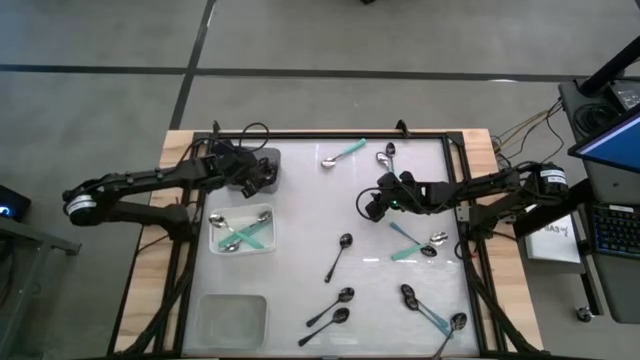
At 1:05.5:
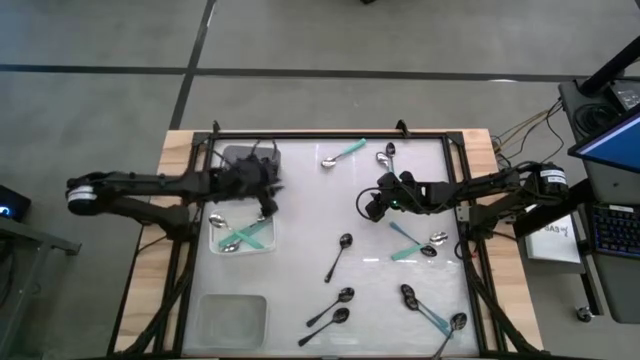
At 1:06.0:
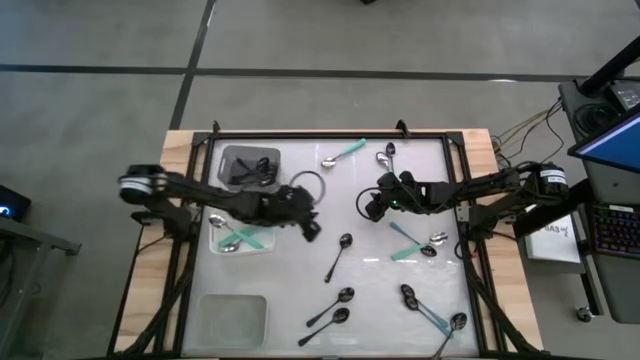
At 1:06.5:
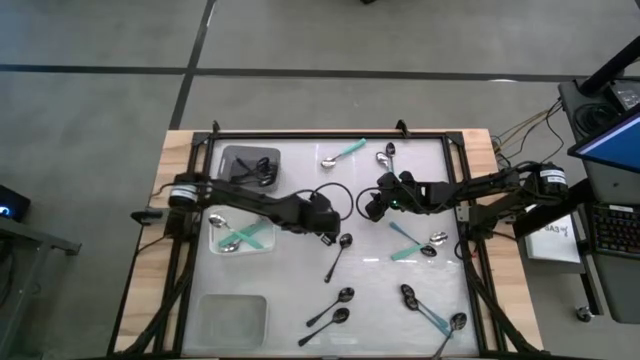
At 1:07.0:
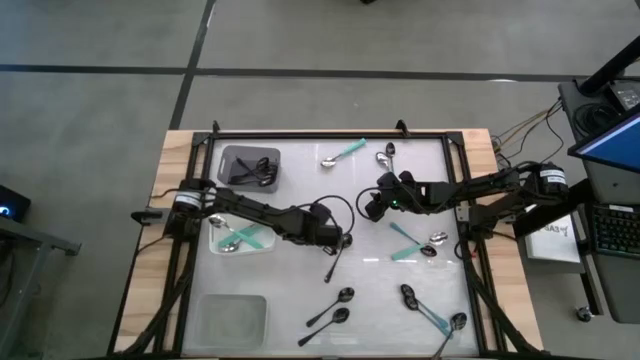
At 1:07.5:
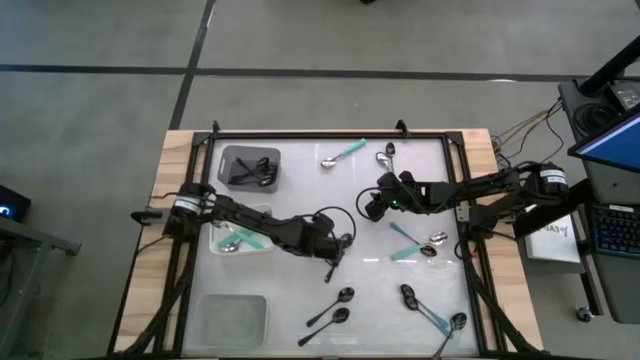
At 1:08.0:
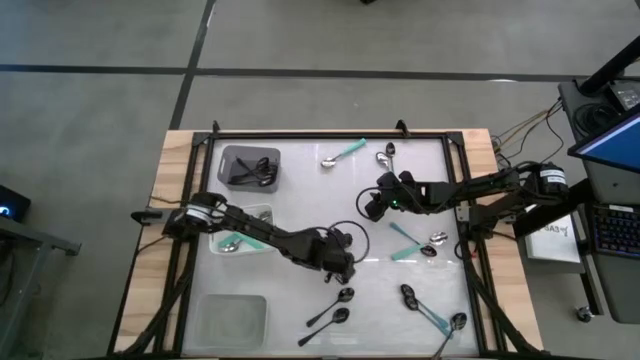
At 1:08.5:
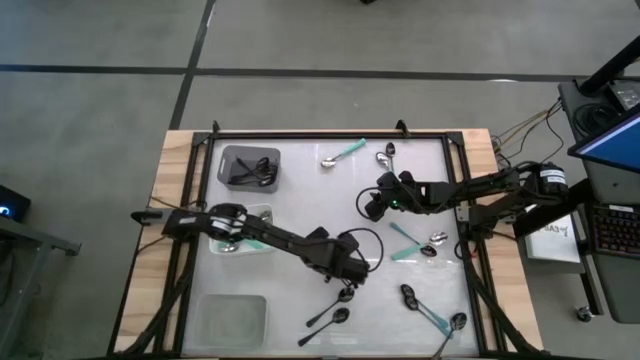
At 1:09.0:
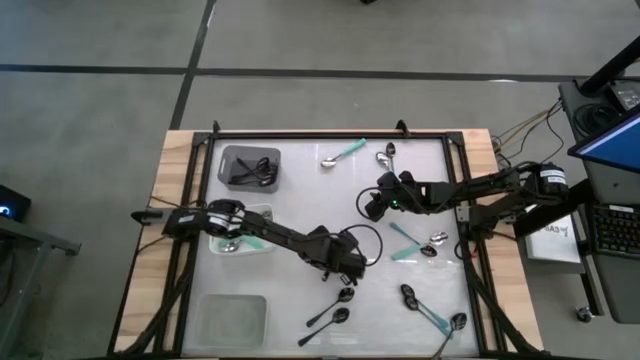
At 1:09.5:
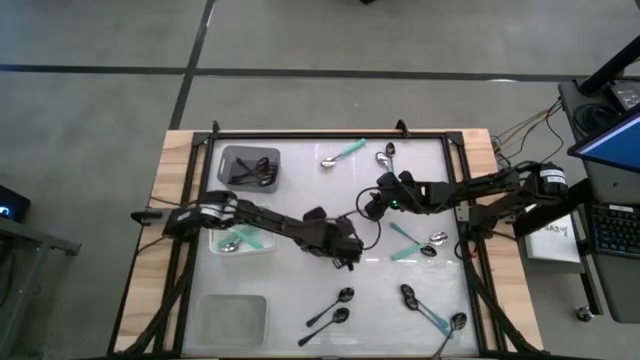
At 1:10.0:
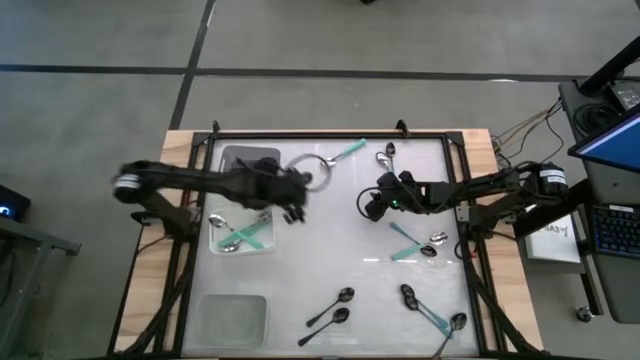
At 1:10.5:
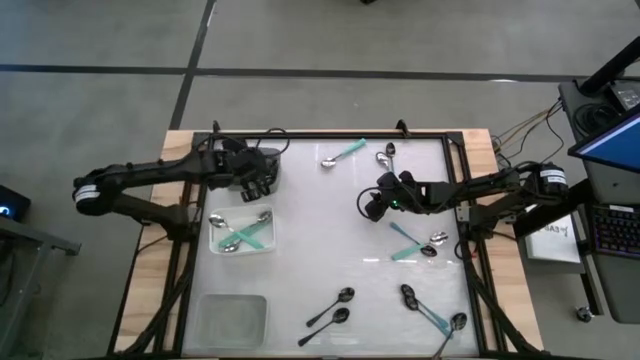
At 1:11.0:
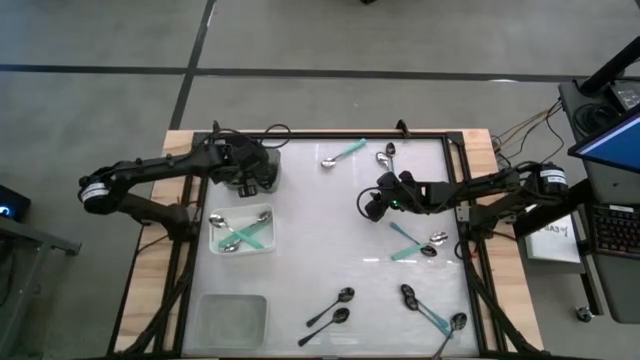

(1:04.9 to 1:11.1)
Task: Sort silverware by color (type)
Put the black spoon into the black bin

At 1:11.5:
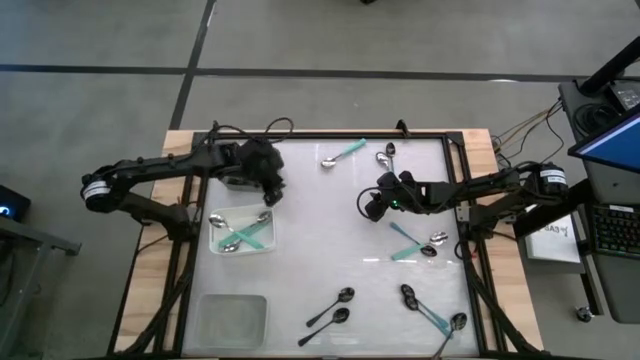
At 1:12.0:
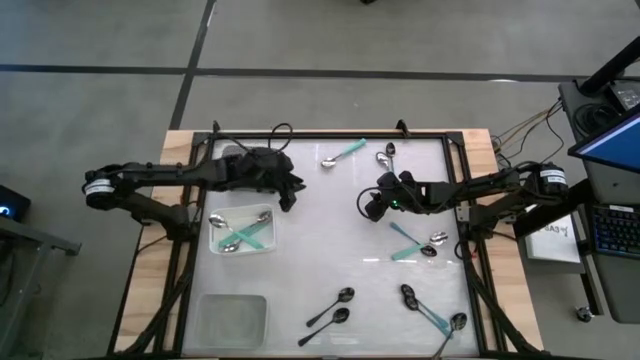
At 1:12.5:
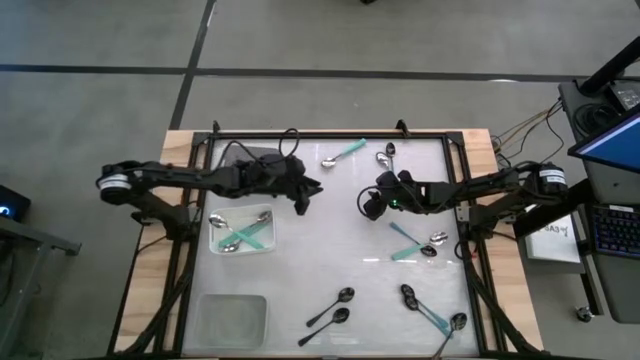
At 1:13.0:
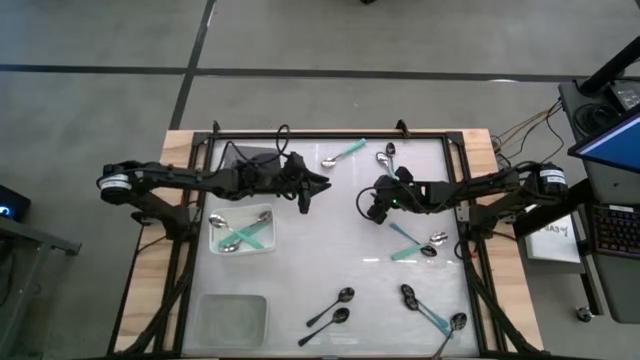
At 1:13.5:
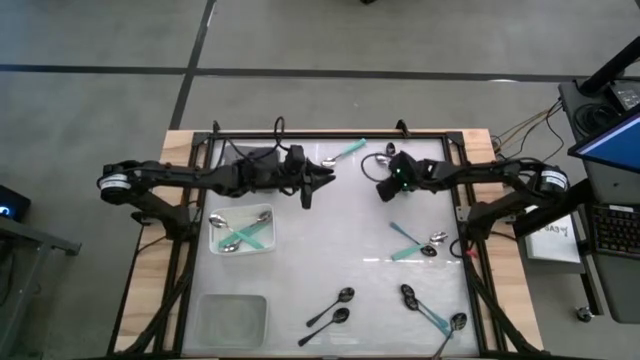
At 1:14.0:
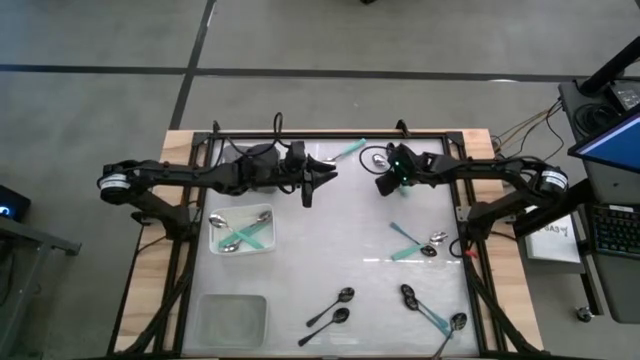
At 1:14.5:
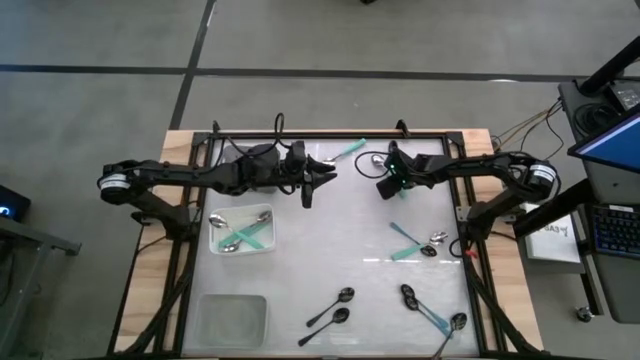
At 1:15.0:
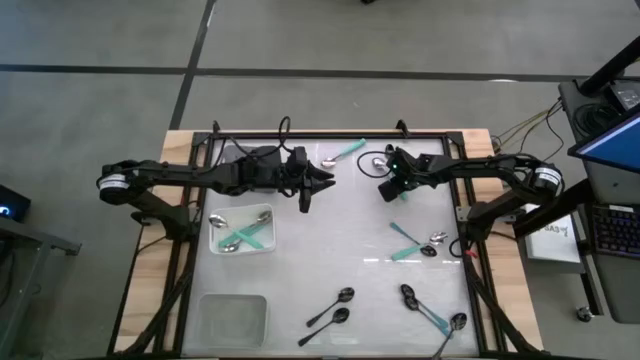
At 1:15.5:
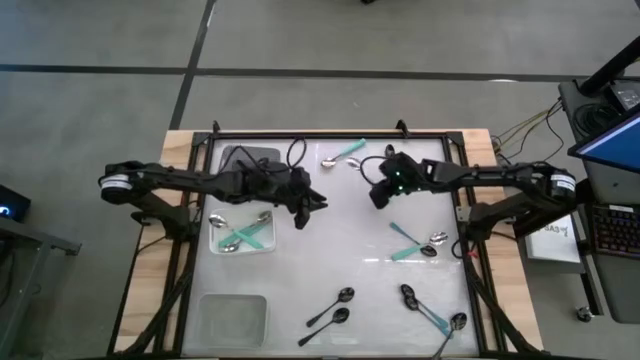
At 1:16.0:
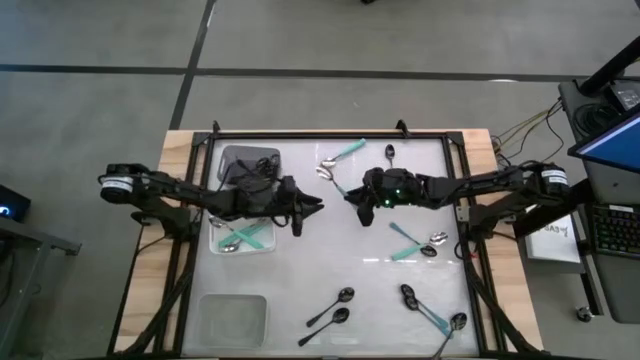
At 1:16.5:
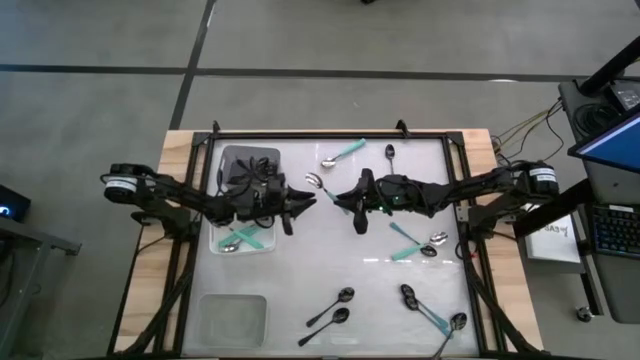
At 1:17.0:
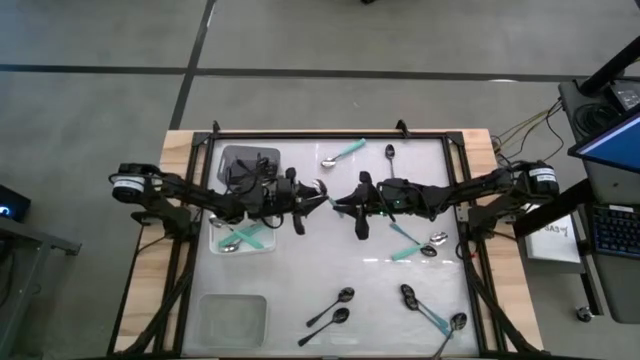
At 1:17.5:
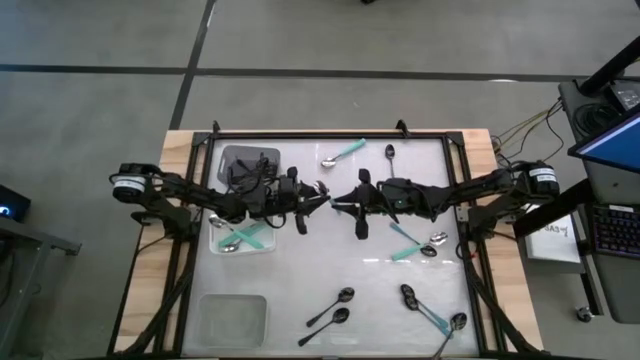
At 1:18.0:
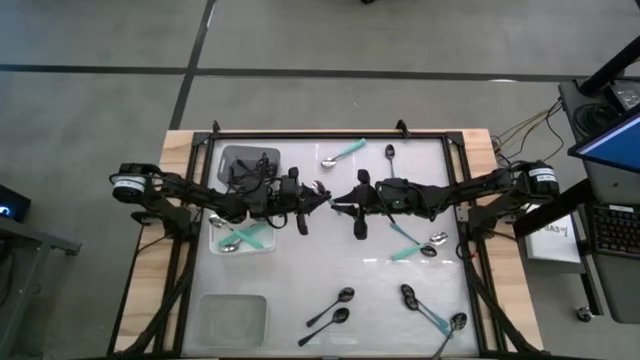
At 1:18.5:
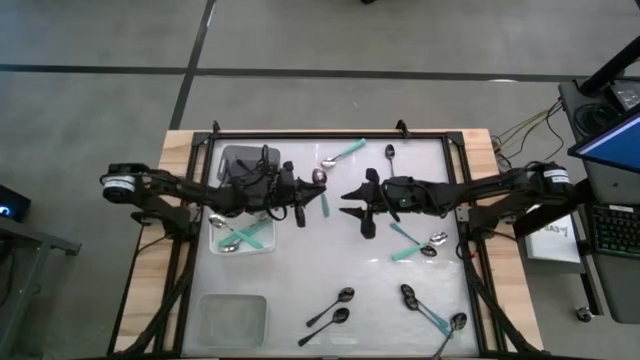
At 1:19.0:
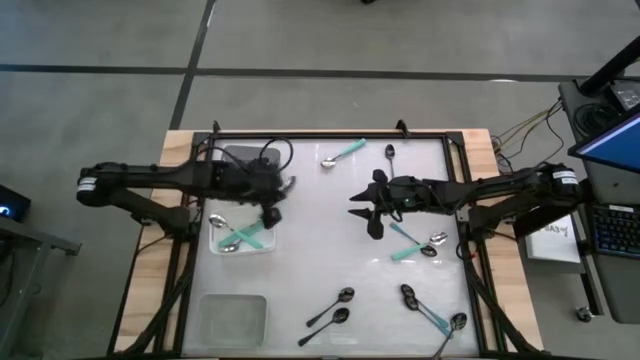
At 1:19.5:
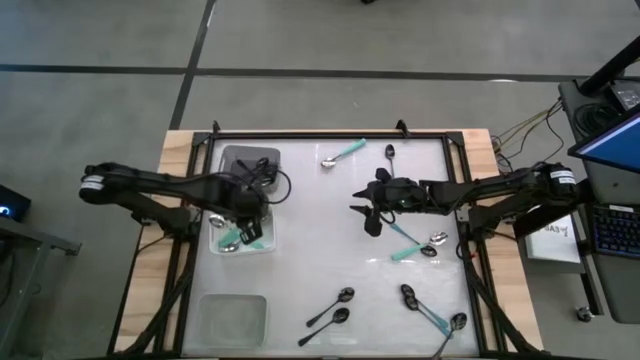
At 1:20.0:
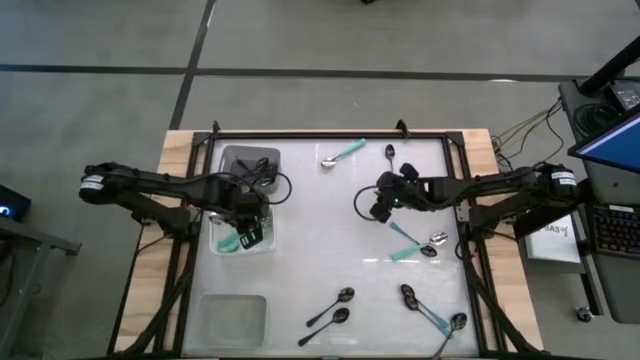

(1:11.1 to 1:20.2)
Put the light green spoon into the white bin

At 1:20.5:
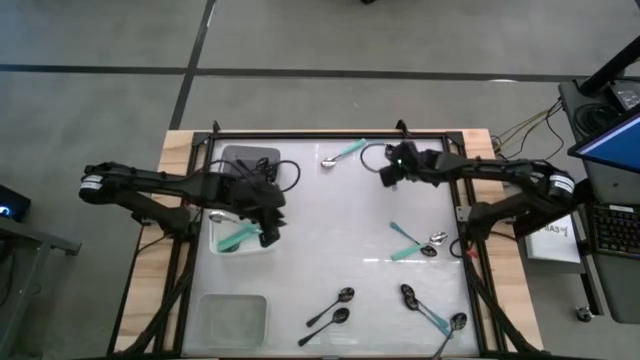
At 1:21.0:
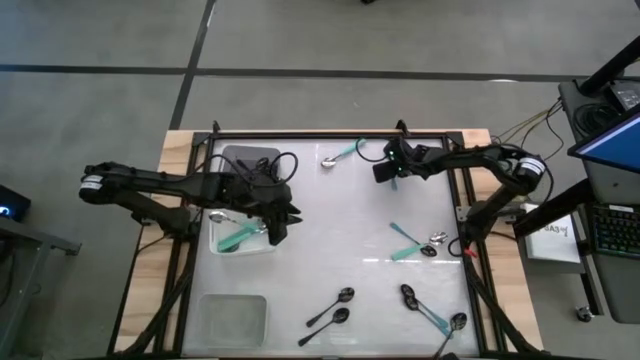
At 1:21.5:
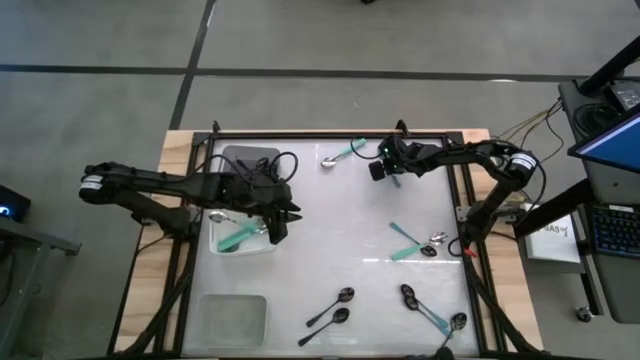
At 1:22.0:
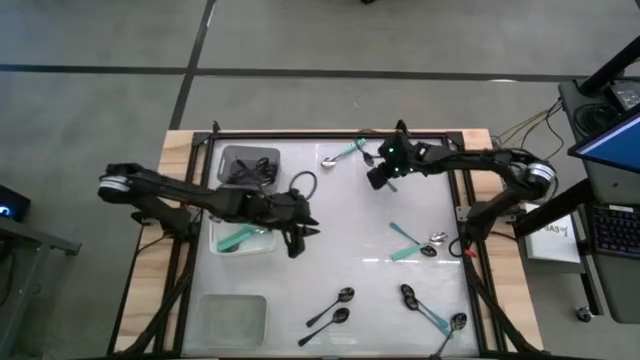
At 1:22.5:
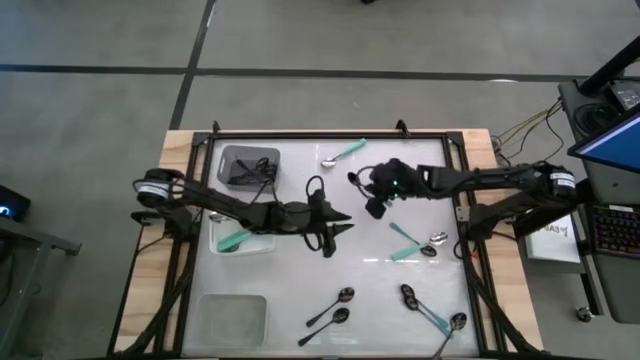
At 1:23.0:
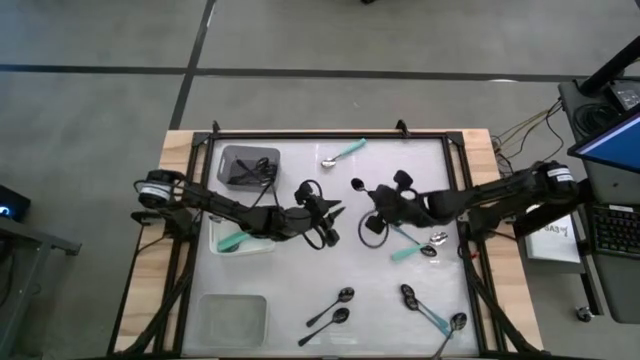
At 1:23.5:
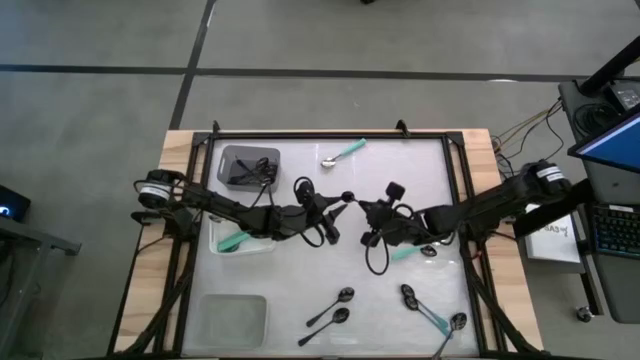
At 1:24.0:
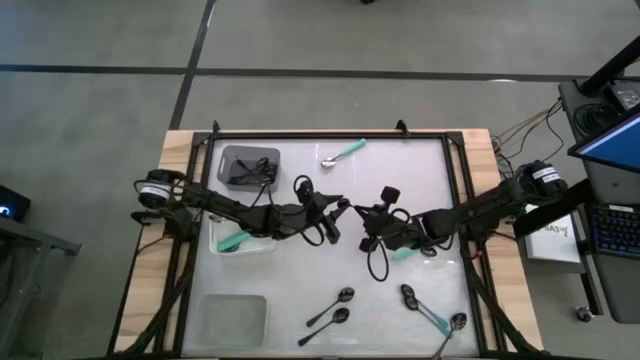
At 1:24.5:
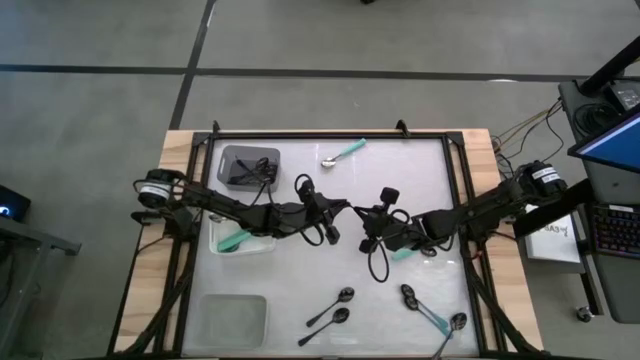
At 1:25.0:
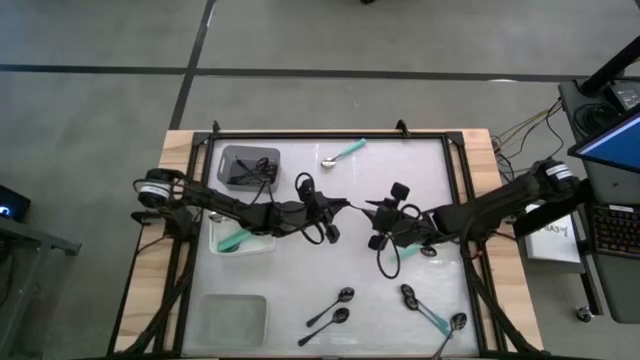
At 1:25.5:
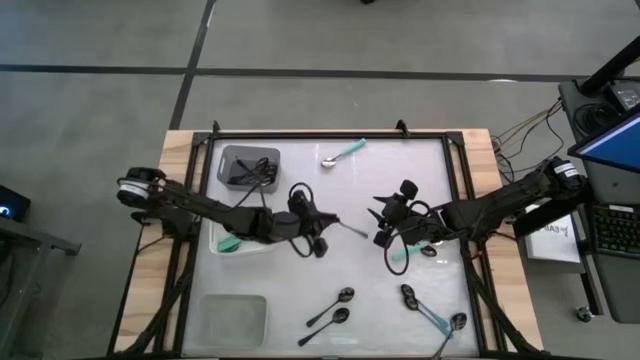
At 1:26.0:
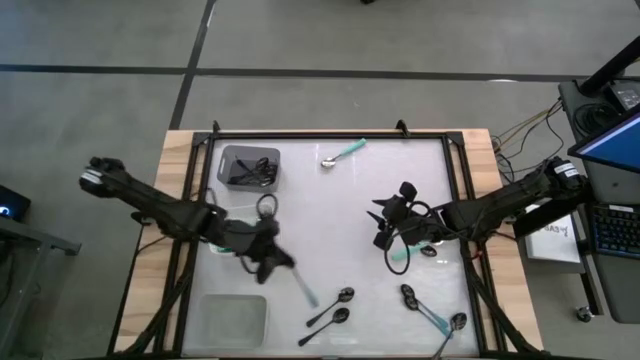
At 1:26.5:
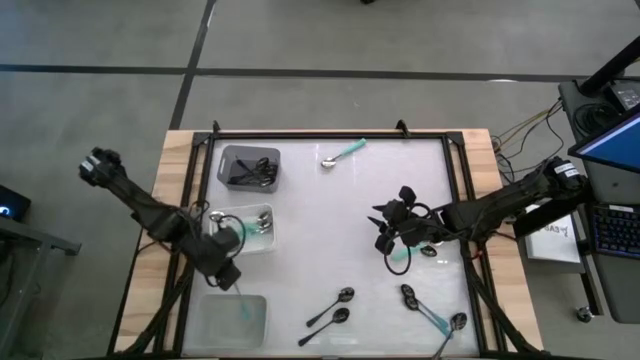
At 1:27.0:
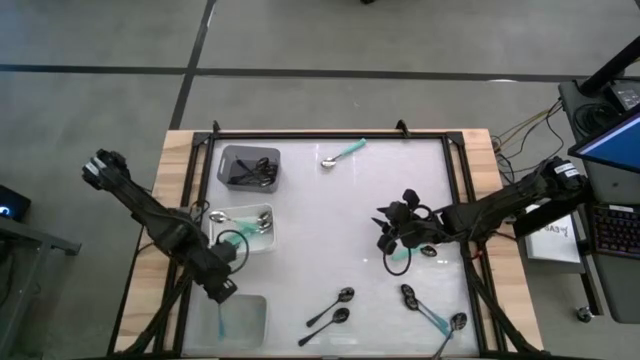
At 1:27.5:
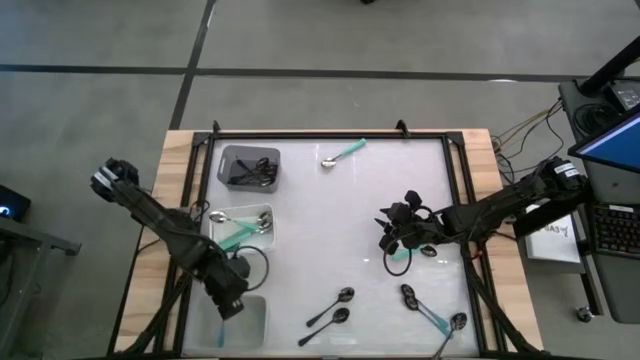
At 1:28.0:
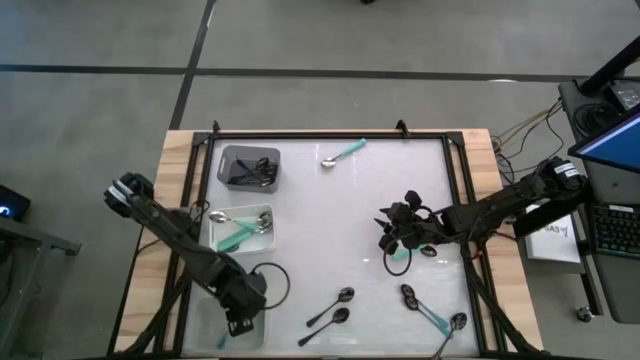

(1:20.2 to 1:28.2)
Put the blue spoon into the gray bin
